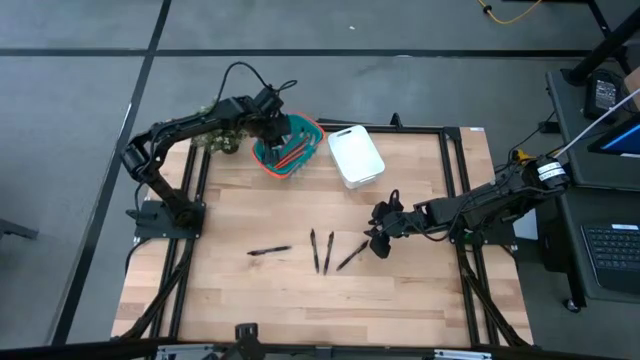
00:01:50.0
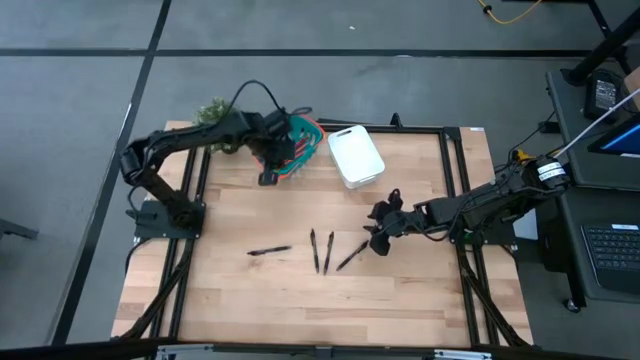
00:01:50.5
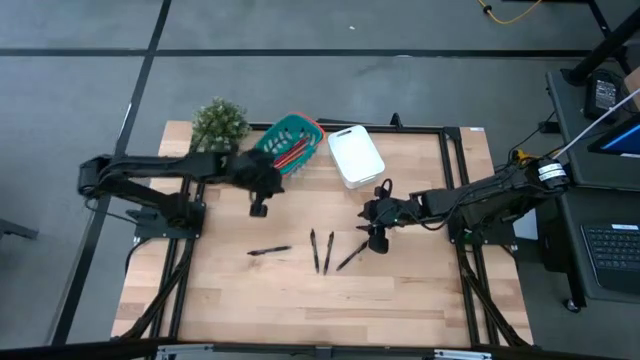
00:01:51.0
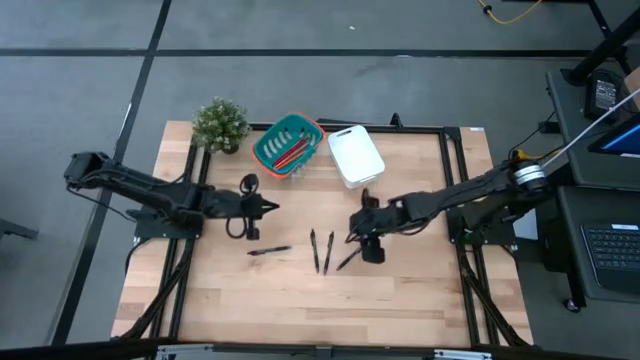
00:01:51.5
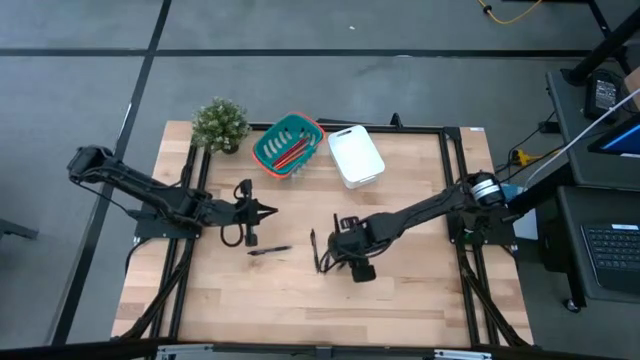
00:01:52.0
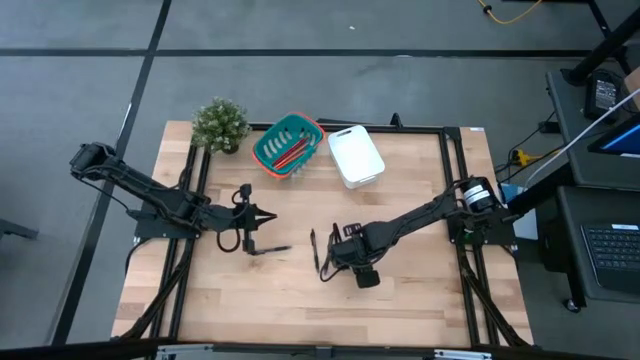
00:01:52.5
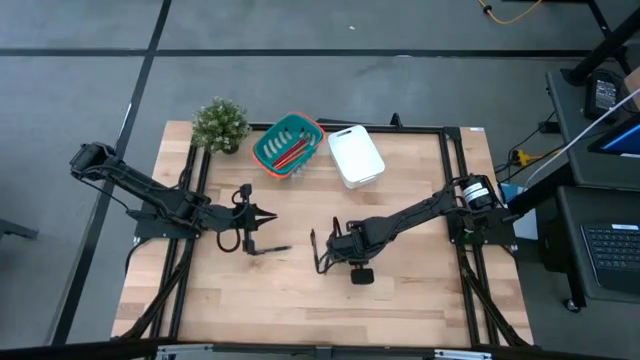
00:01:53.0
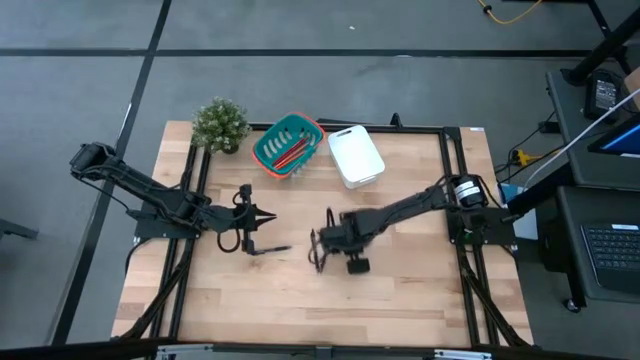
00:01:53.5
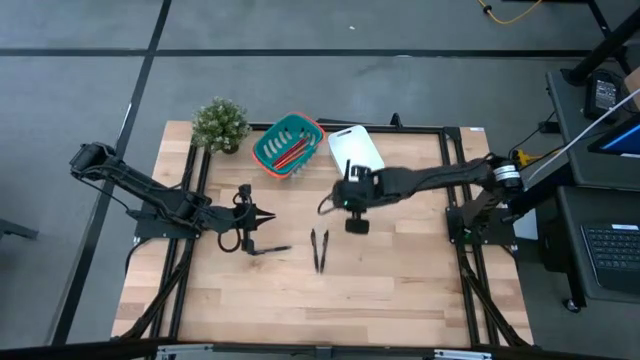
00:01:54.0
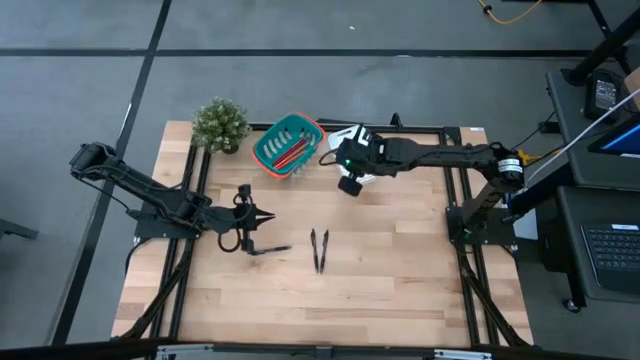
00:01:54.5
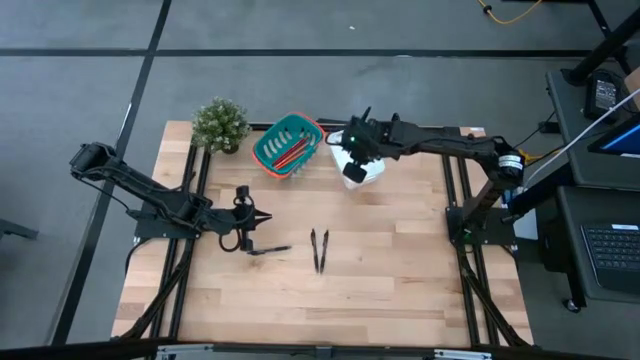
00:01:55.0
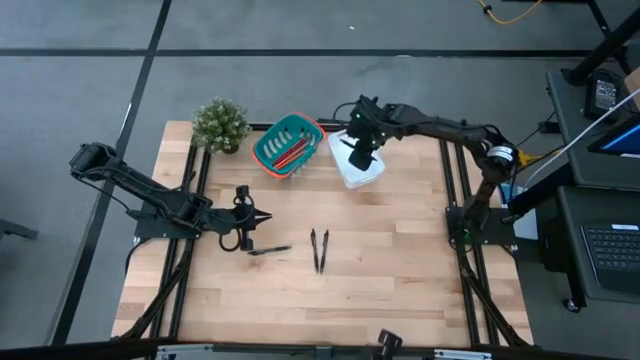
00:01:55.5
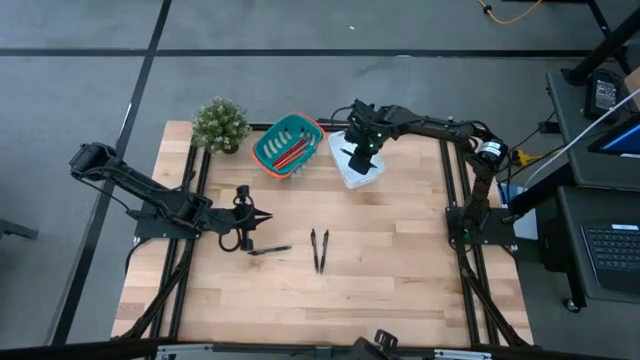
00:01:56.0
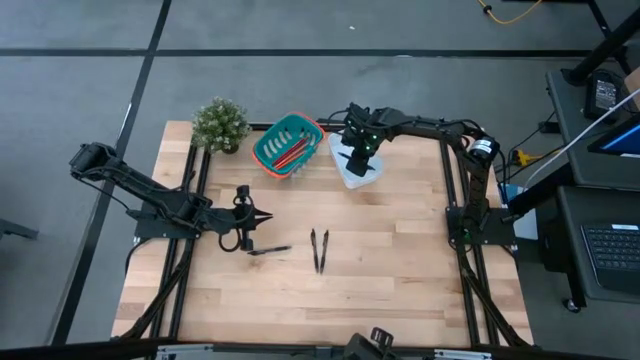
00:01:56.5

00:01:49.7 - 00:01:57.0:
Task: Sort pens & pencils
Put the black pen into the white bin

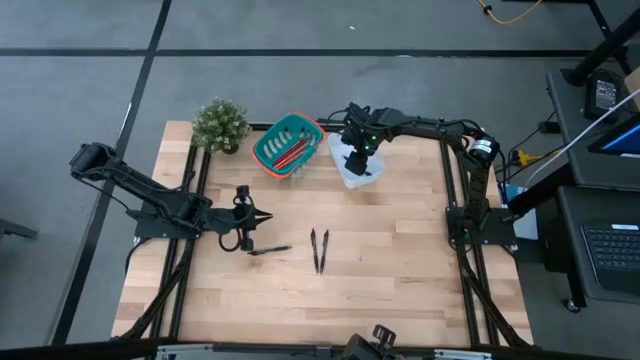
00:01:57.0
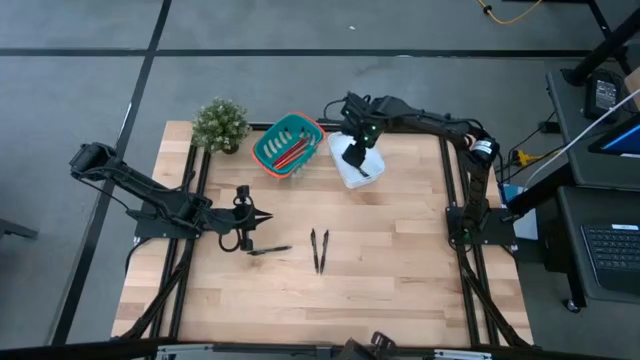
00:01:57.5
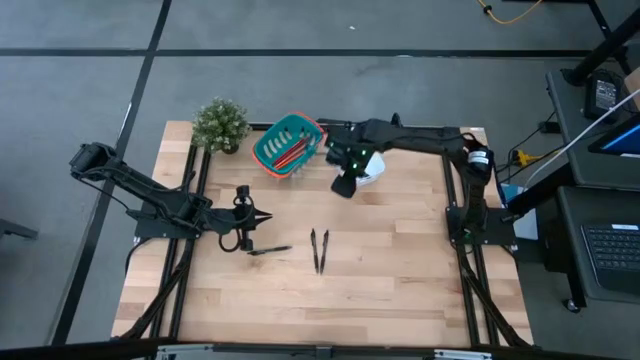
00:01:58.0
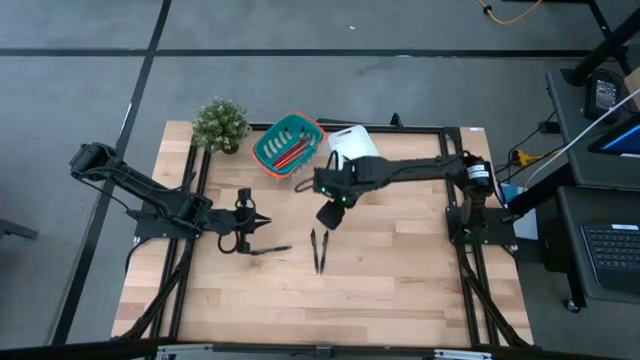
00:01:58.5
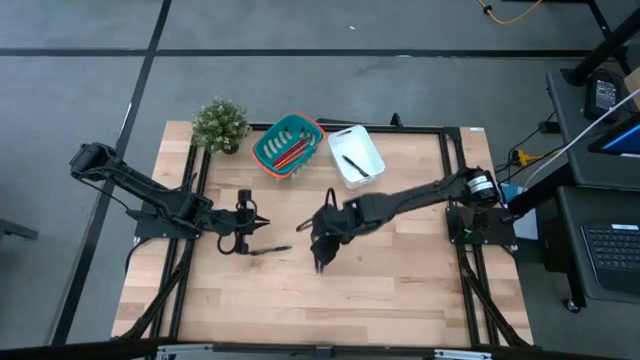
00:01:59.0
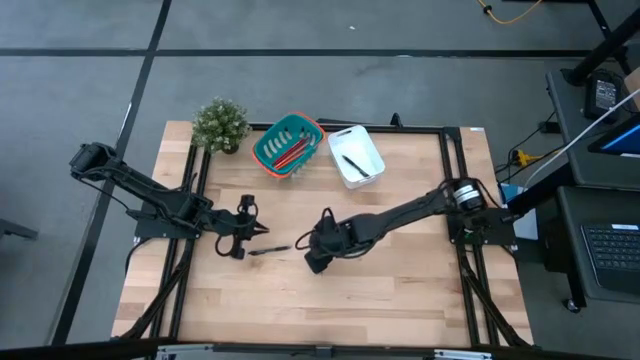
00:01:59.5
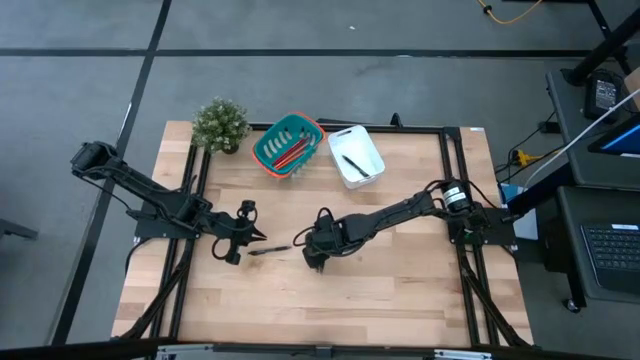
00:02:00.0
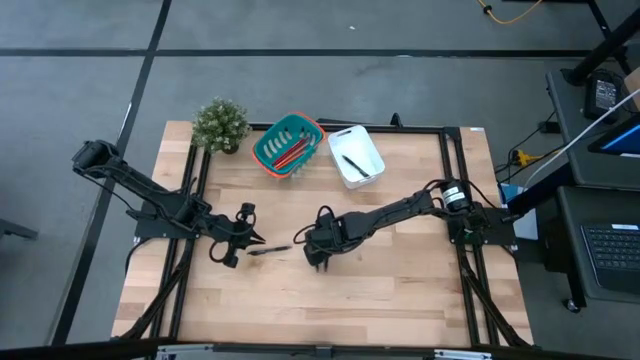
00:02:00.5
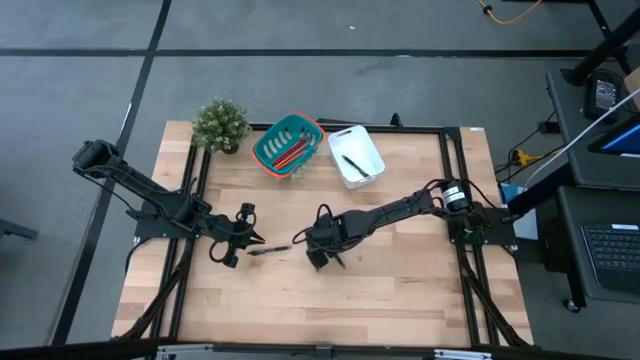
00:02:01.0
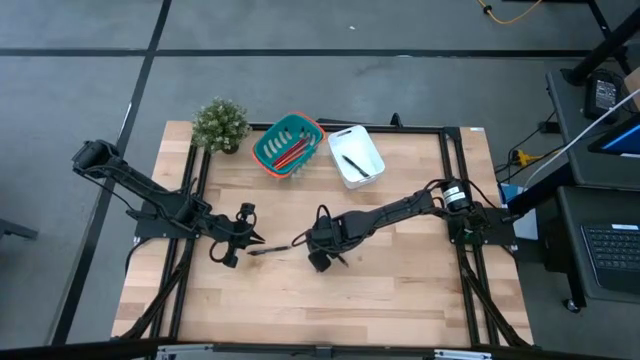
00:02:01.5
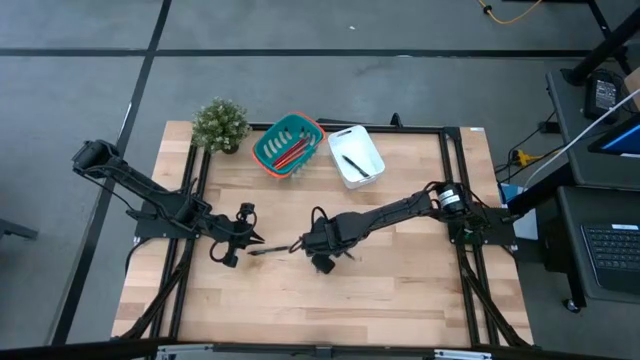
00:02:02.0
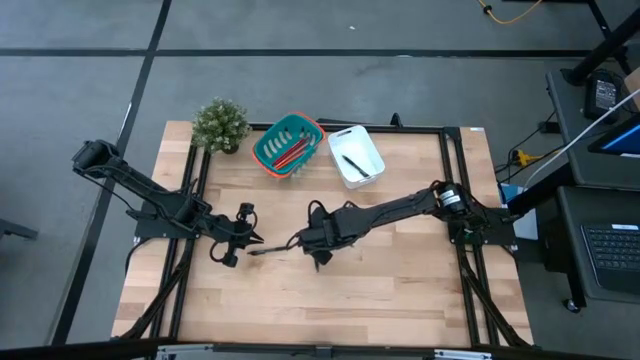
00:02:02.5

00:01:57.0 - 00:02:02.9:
Put the black pen into the white bin

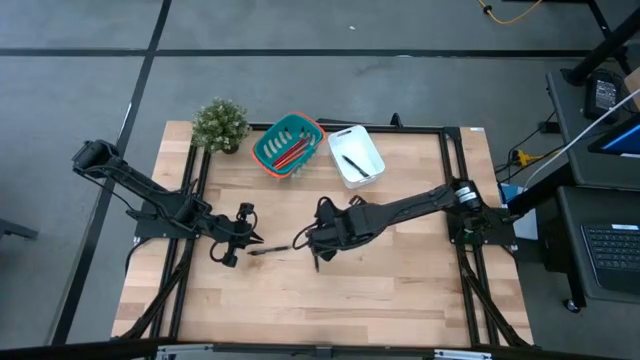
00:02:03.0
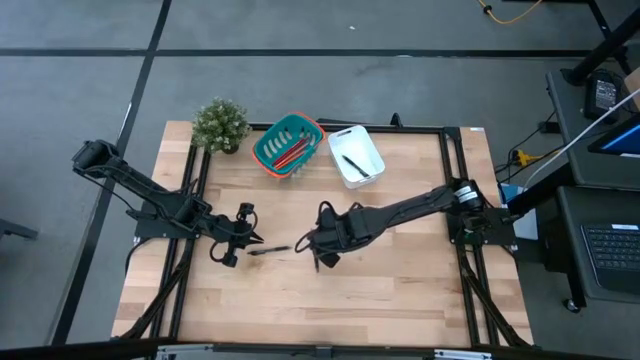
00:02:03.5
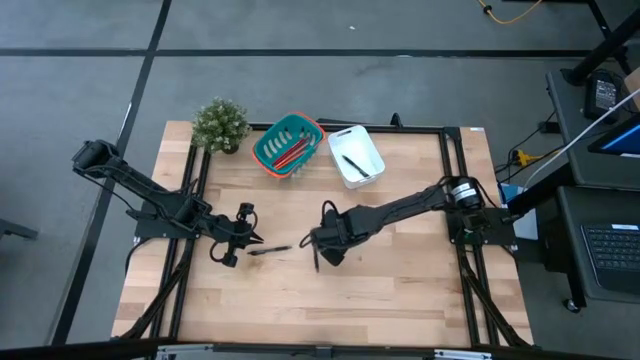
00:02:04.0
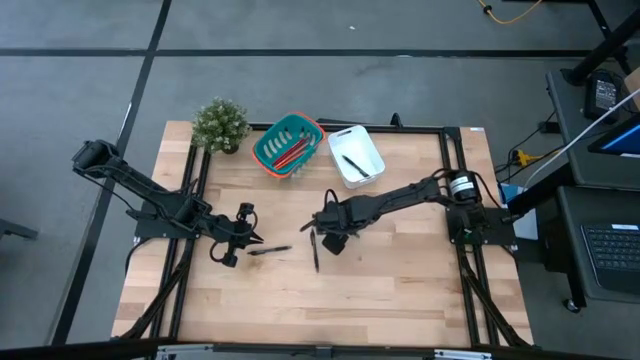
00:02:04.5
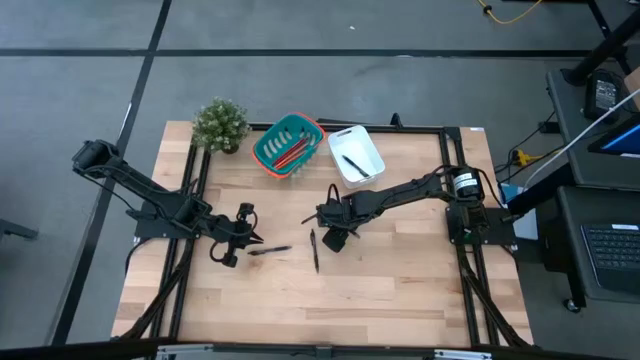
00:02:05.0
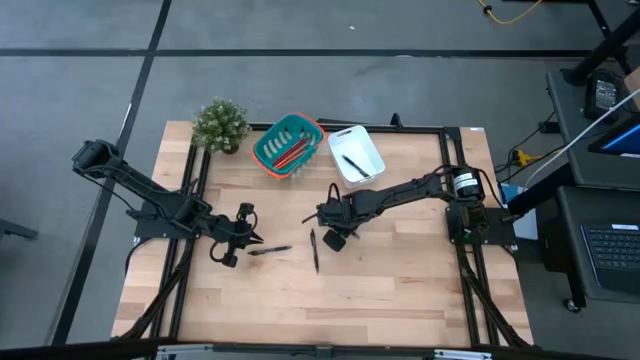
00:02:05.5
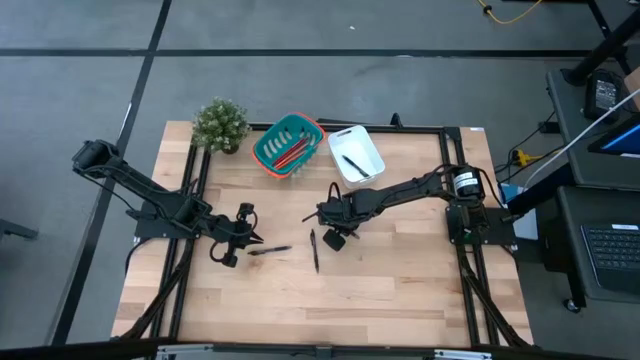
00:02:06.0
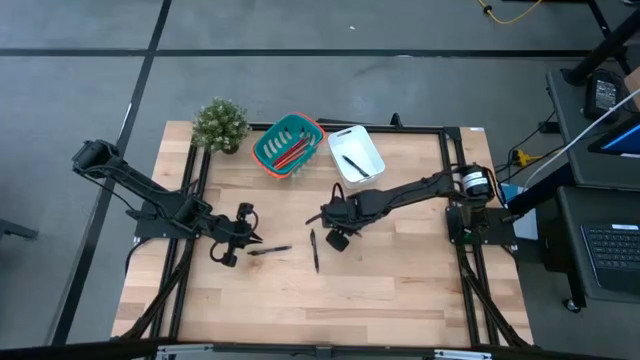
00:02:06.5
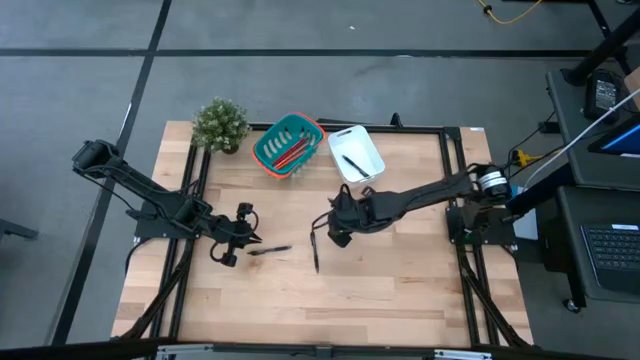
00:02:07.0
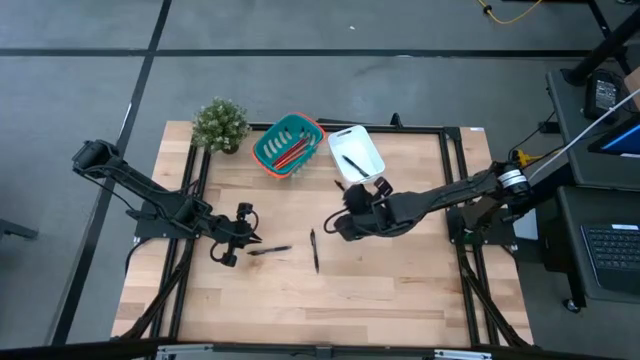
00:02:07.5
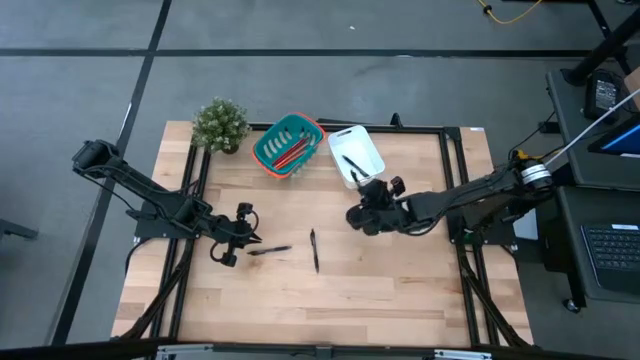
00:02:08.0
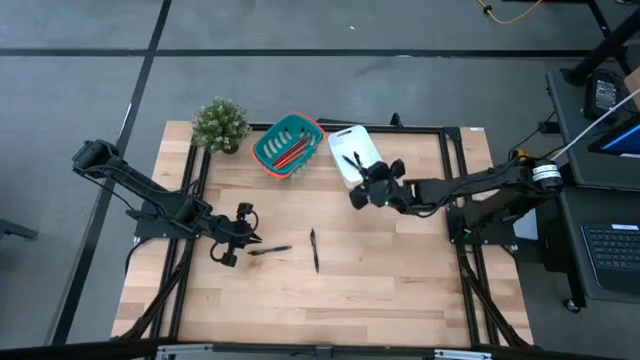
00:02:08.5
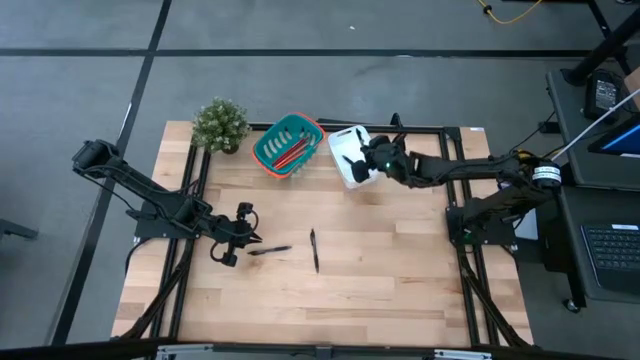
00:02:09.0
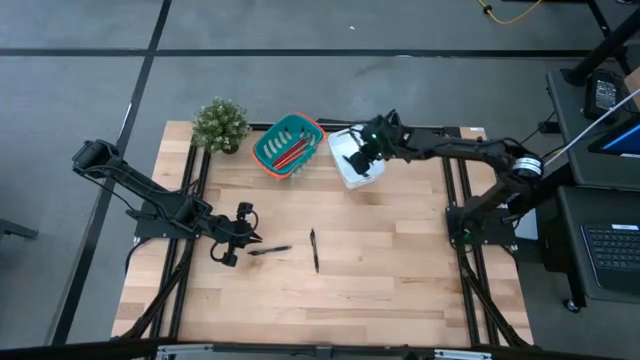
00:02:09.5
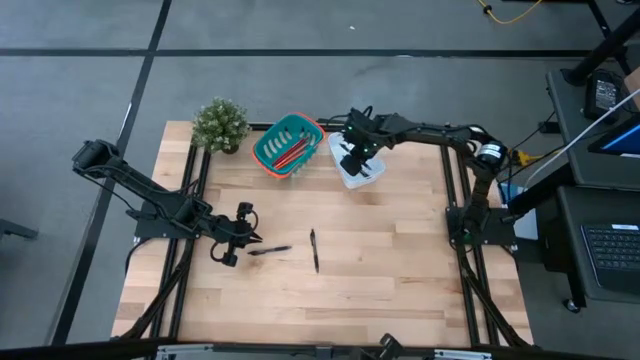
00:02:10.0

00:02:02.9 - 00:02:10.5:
Put the black pen into the white bin

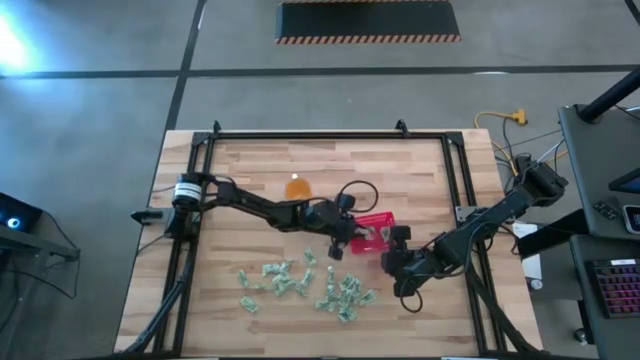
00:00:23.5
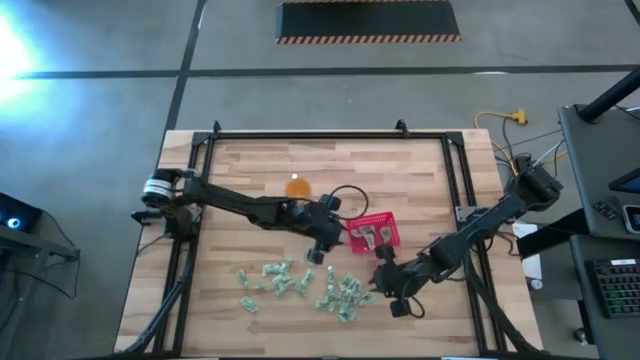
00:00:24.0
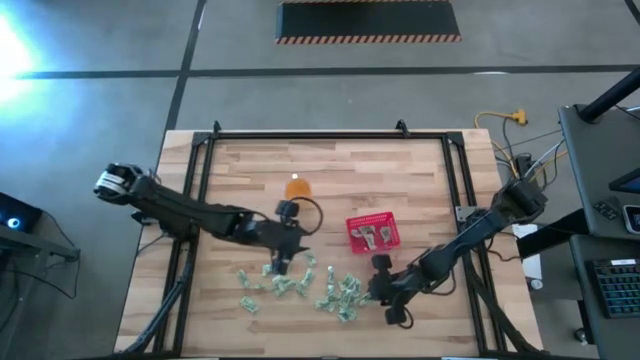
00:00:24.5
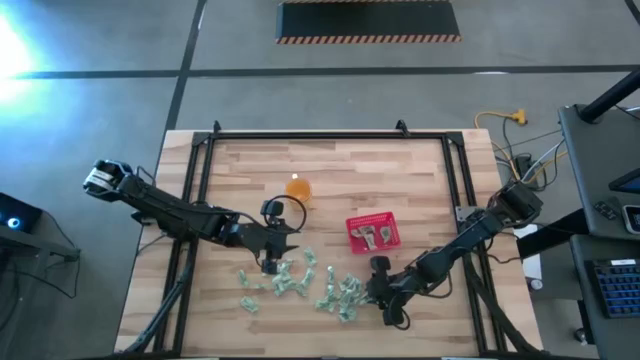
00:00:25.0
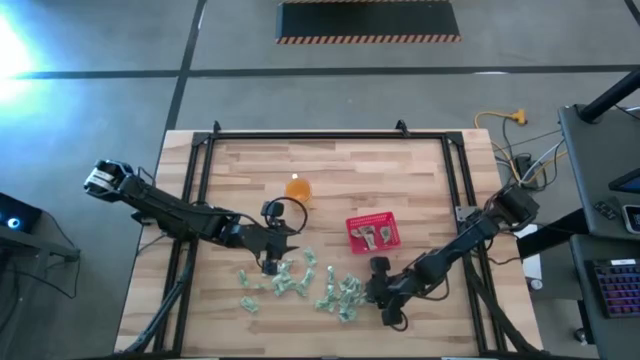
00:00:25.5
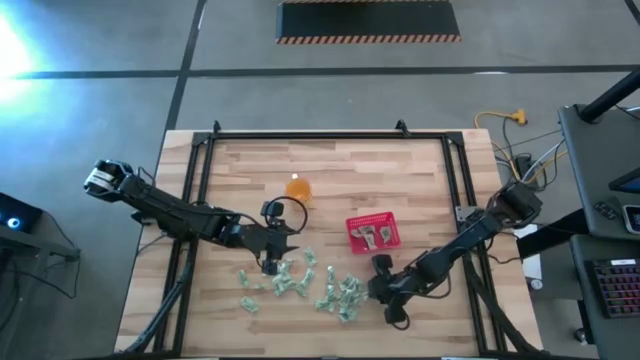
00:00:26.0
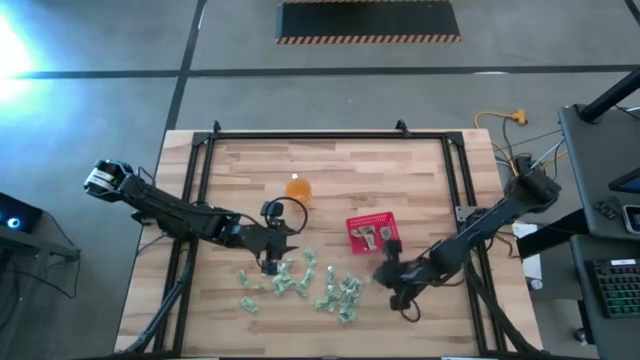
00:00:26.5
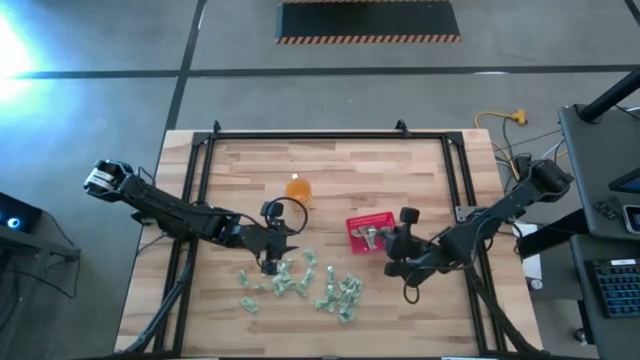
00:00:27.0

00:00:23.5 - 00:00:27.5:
Task: Pick and place Stevia / Truvia into bins
Put the stevia packet into the basket
